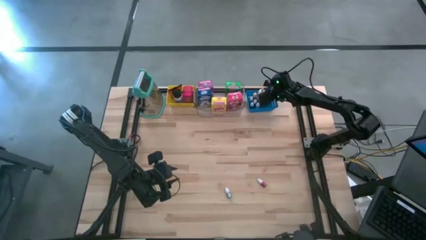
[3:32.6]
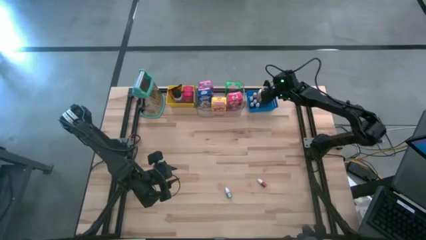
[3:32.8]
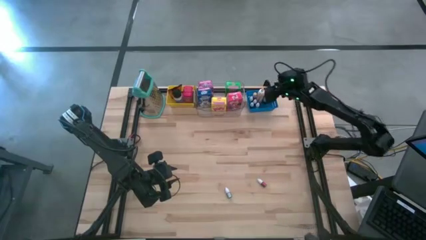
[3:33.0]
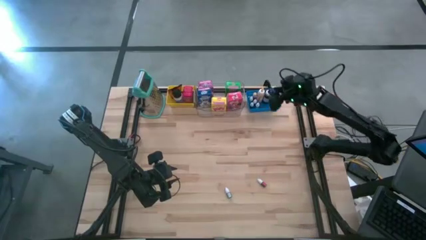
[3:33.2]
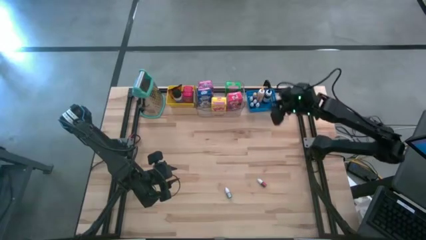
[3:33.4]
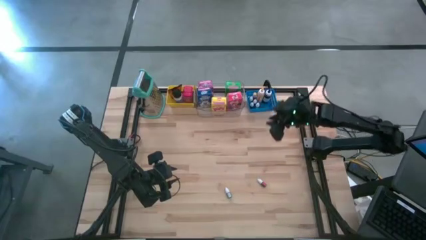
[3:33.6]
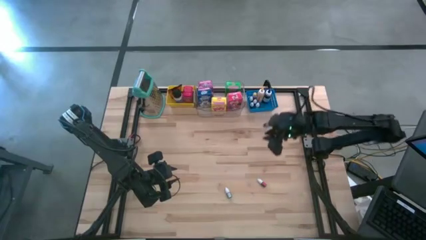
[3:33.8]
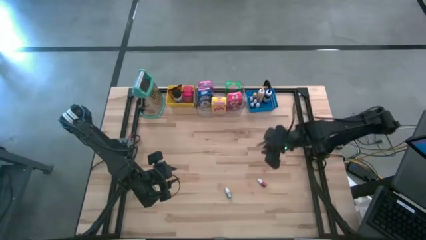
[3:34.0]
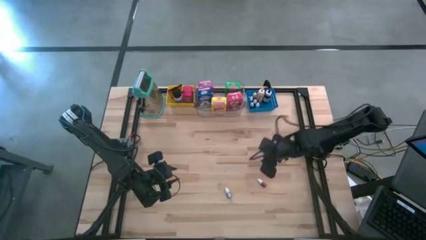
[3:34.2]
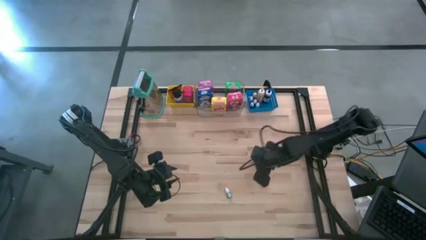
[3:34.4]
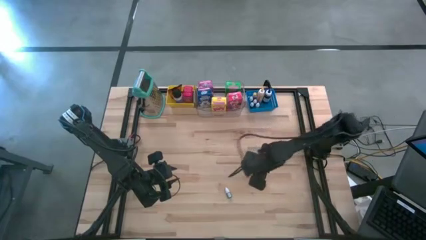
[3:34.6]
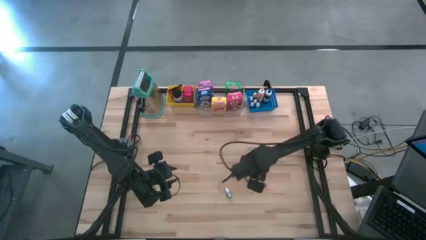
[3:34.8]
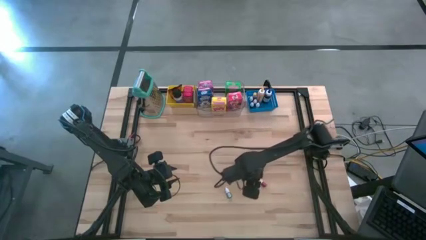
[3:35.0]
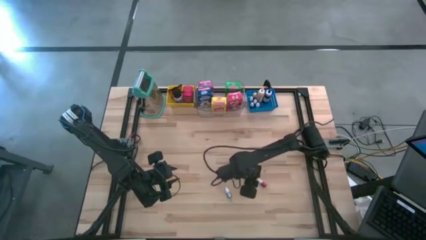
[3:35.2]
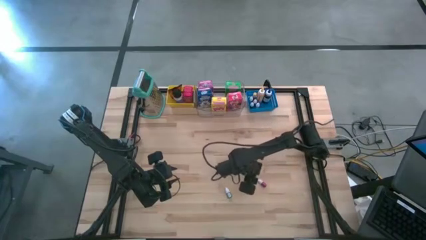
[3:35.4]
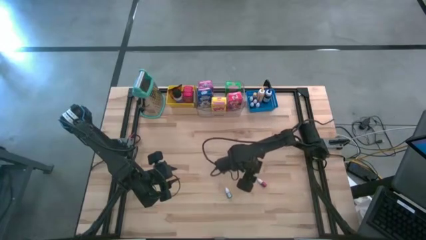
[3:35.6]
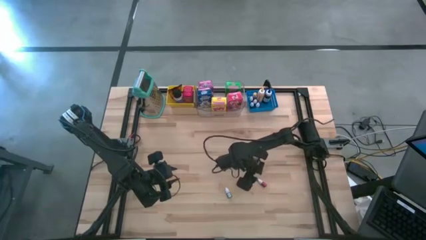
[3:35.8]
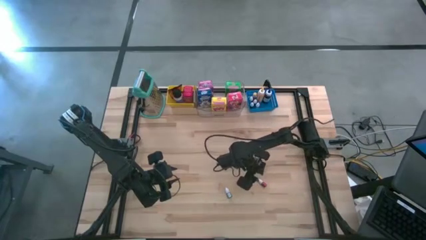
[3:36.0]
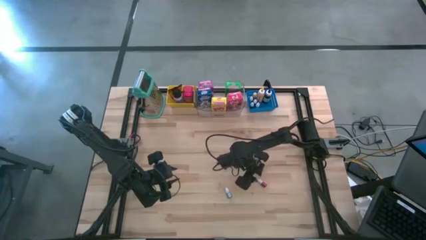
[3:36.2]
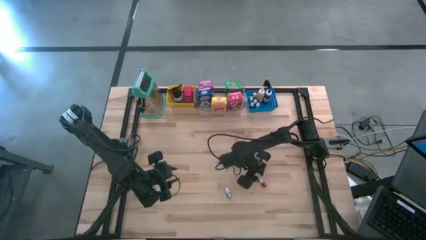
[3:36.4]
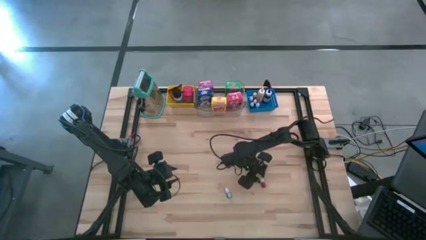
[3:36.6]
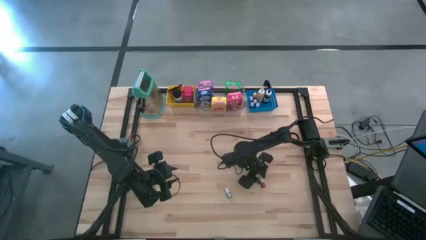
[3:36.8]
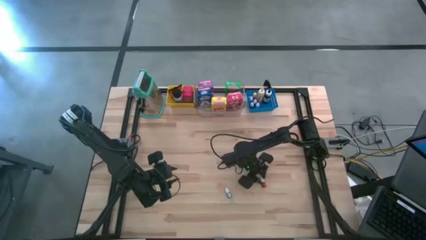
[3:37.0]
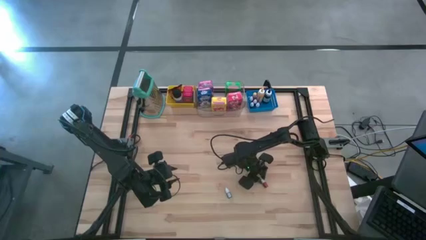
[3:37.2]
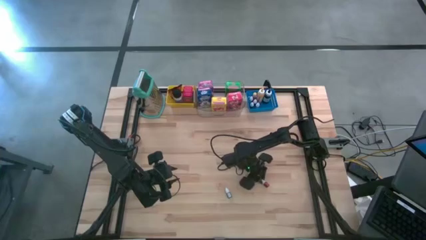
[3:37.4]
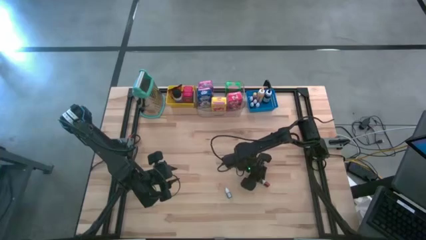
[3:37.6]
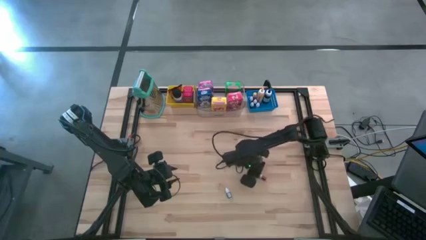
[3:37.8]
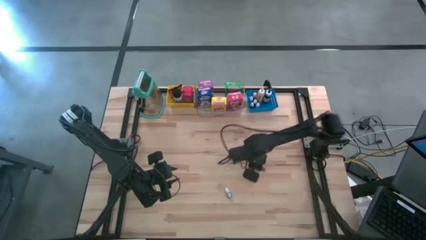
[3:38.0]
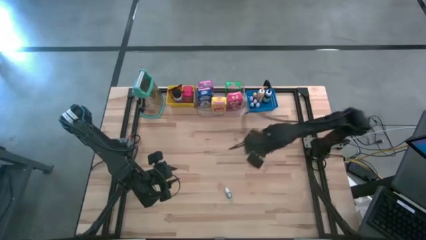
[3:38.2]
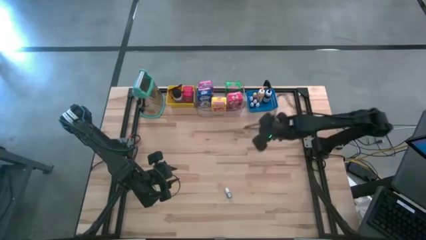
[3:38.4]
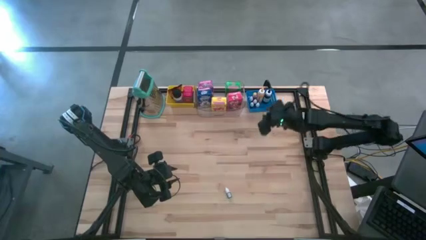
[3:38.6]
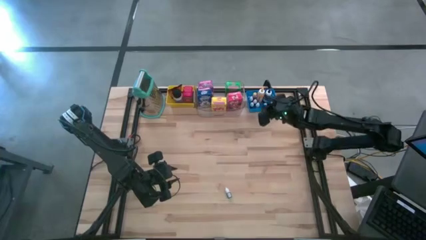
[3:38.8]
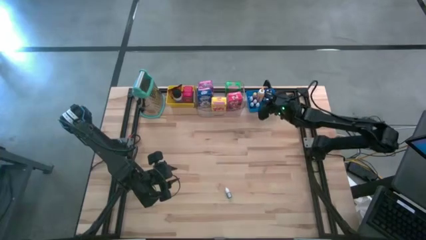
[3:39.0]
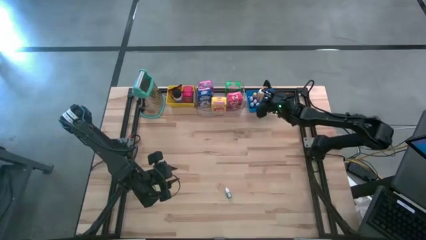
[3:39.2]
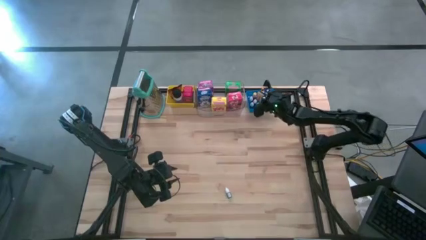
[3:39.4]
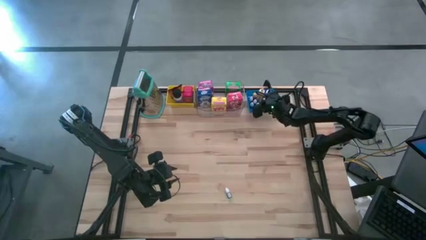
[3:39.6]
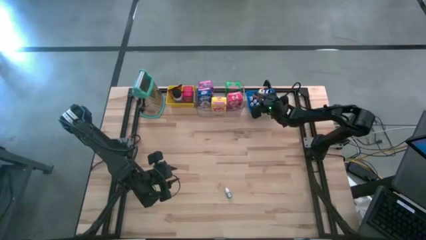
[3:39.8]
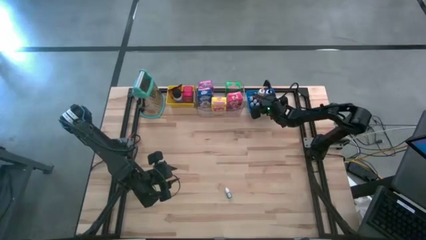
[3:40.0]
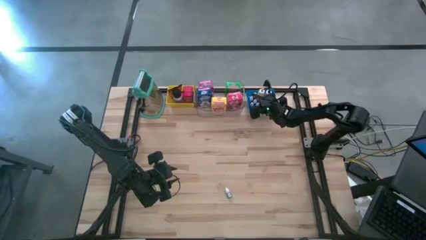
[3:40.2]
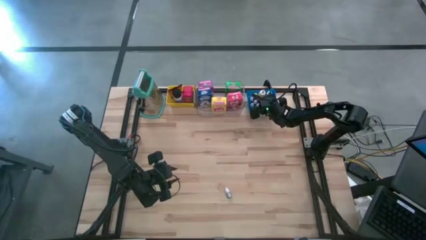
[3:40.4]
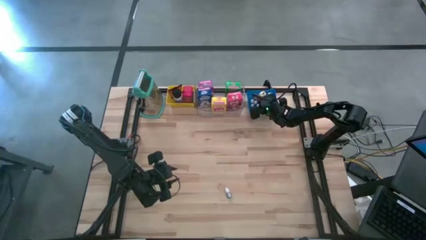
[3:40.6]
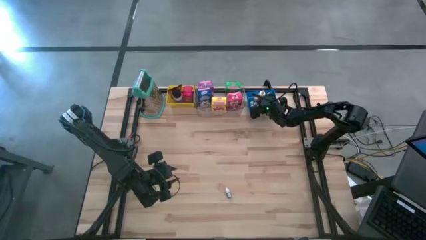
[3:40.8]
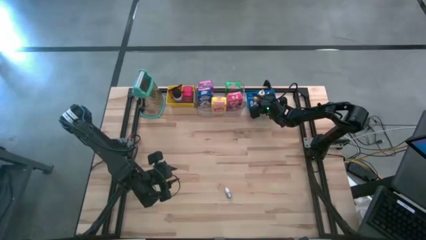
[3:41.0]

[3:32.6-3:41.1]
Task: Pick & Place Kitchen Items
Put the purple bottle into the blue bin

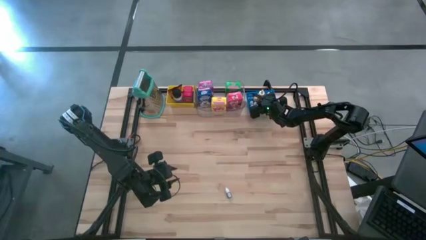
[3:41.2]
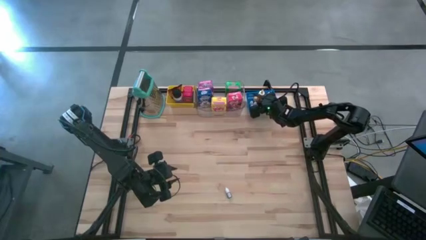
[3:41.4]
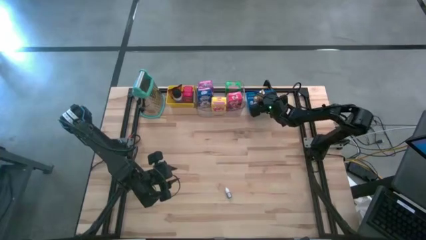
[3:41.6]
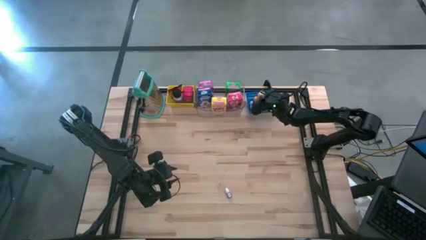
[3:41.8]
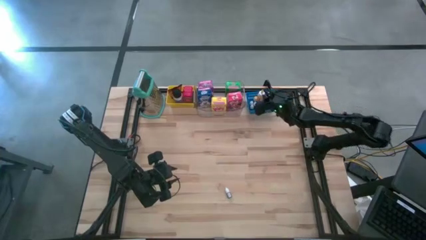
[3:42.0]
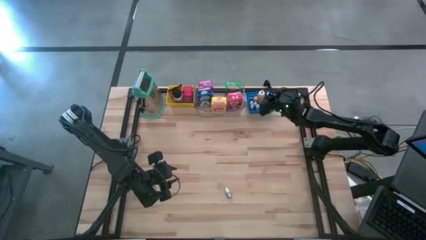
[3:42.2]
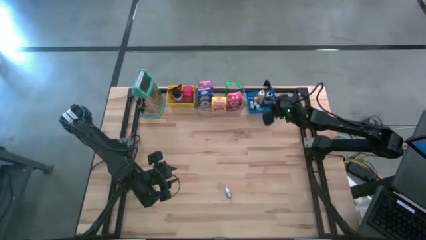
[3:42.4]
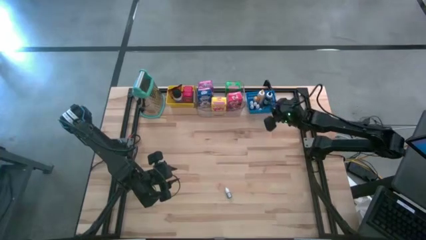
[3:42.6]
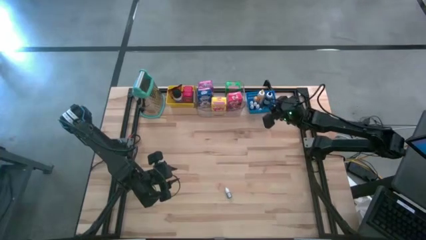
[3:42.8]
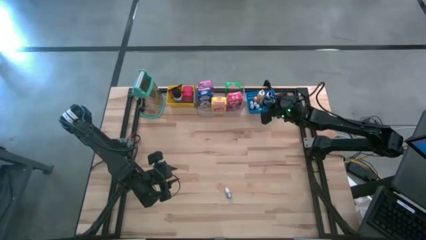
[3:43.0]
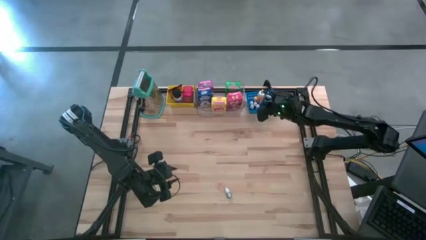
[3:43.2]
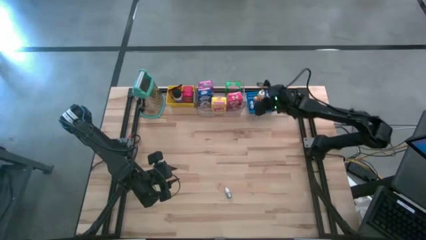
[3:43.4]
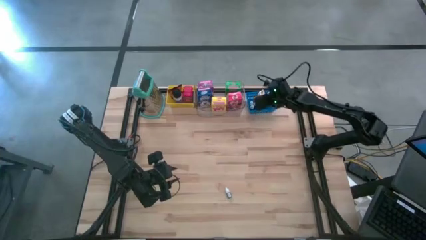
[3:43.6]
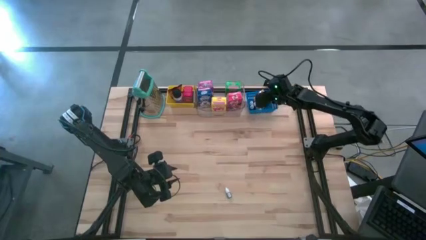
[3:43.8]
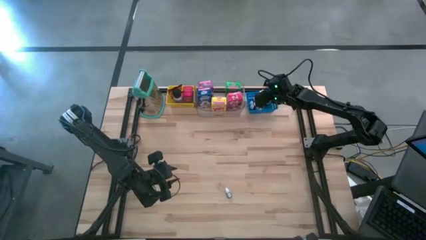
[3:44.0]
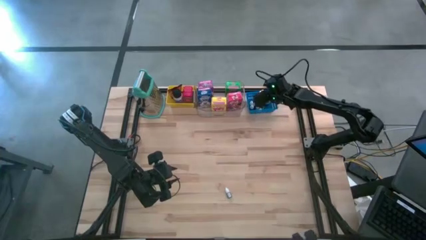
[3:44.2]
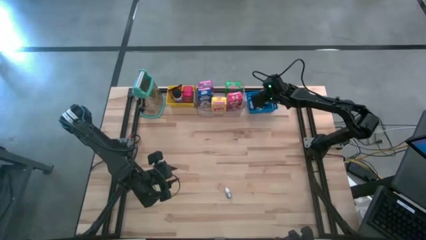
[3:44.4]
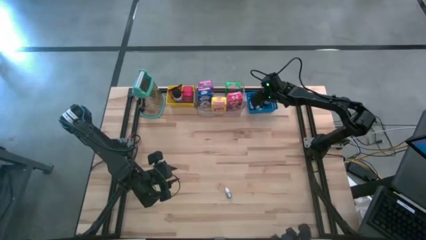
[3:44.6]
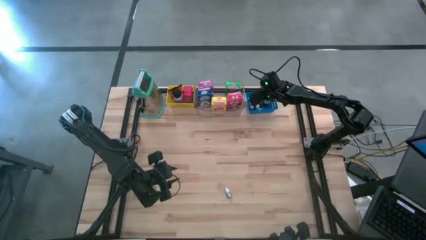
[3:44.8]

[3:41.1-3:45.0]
Adjust the yellow bottle on the blue bin
